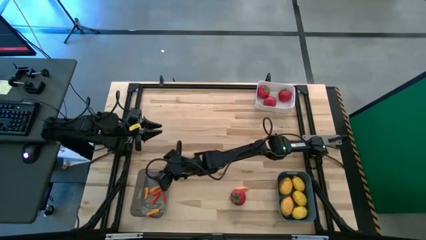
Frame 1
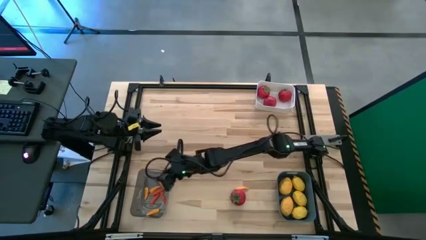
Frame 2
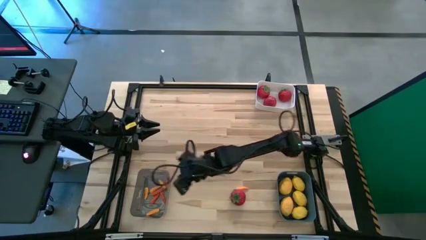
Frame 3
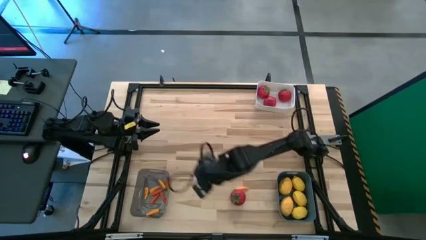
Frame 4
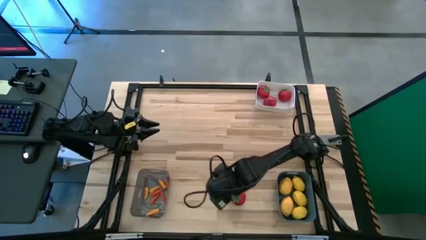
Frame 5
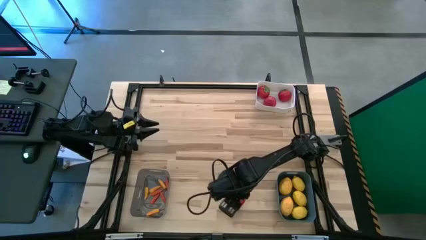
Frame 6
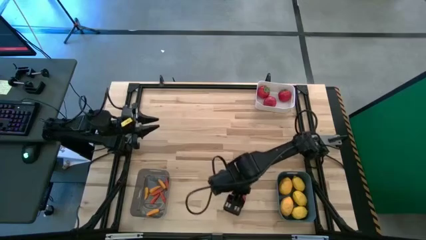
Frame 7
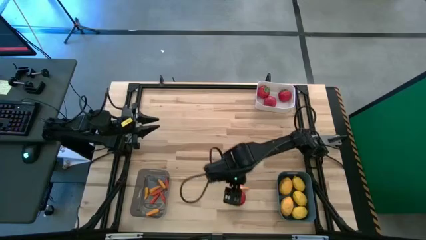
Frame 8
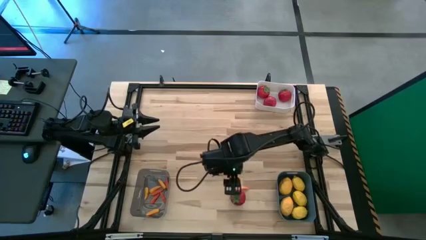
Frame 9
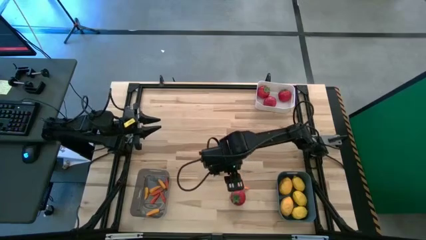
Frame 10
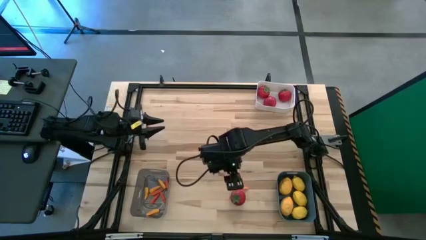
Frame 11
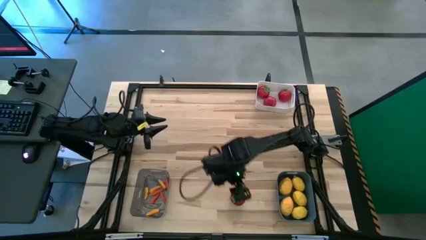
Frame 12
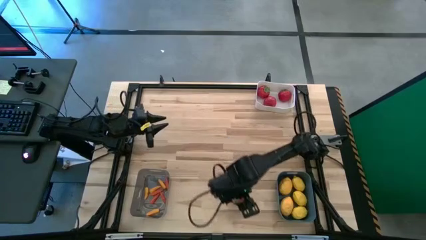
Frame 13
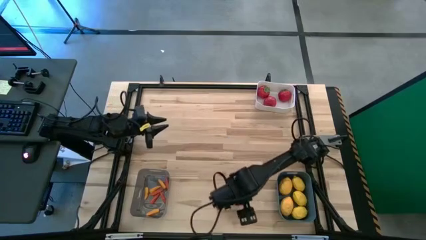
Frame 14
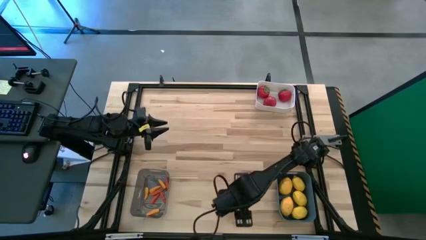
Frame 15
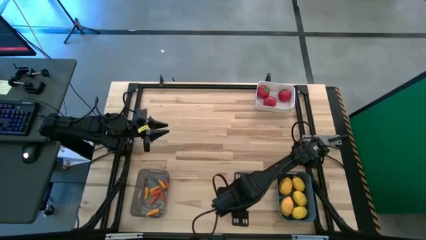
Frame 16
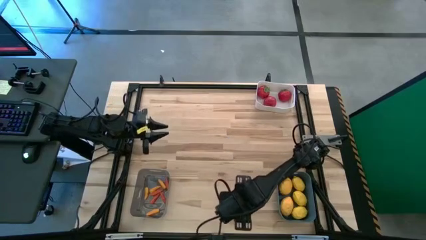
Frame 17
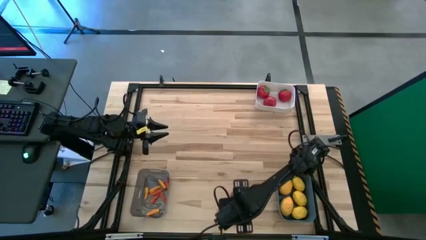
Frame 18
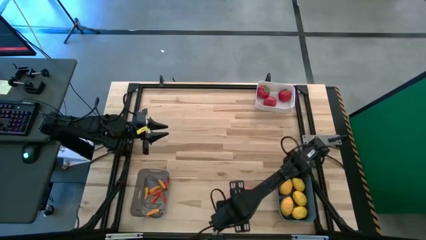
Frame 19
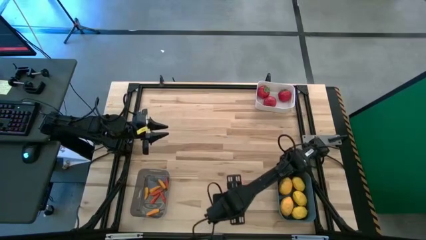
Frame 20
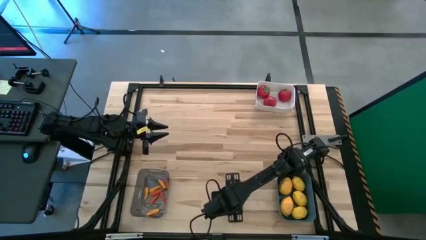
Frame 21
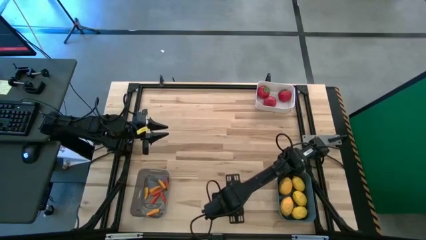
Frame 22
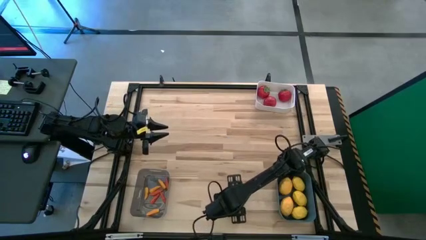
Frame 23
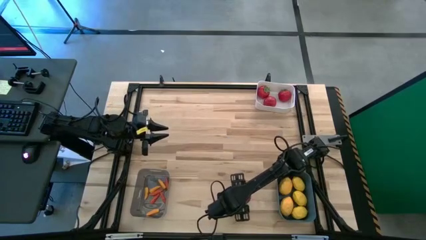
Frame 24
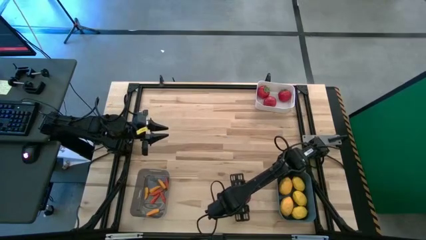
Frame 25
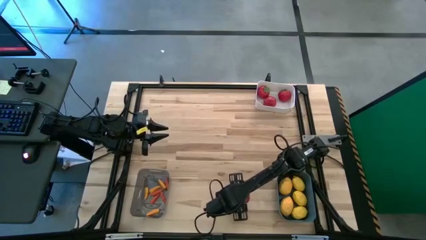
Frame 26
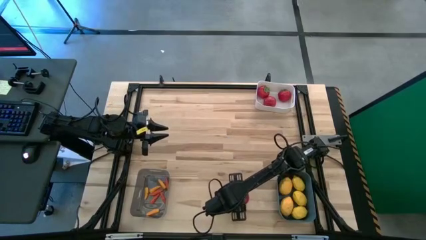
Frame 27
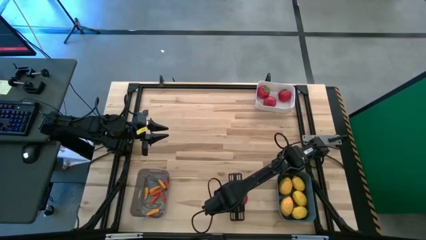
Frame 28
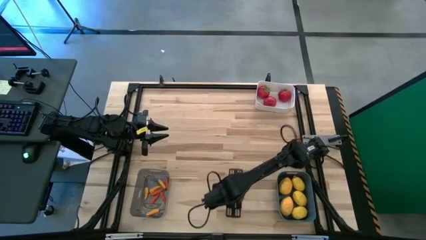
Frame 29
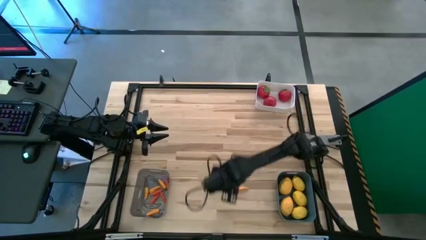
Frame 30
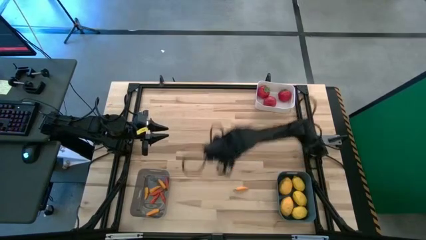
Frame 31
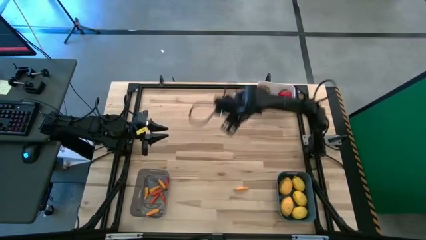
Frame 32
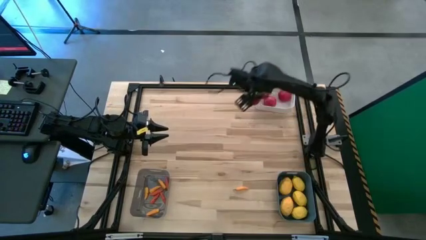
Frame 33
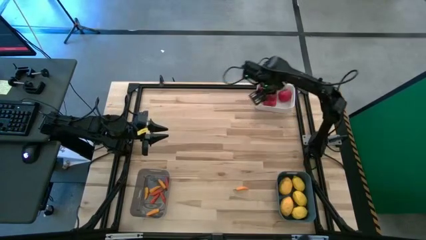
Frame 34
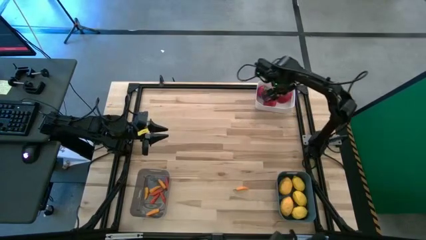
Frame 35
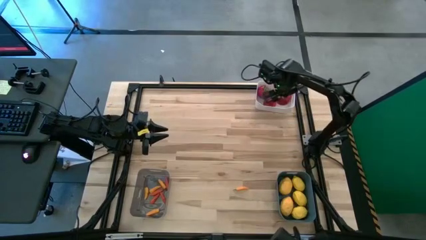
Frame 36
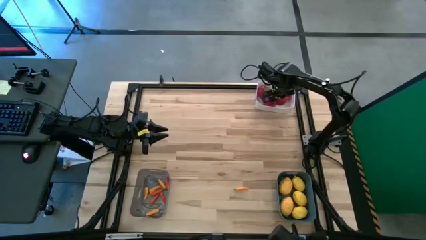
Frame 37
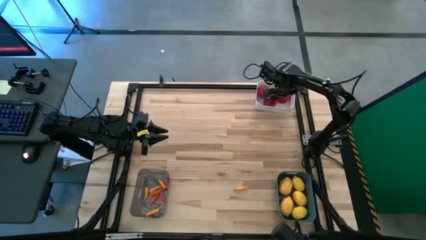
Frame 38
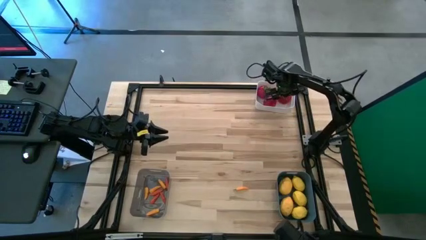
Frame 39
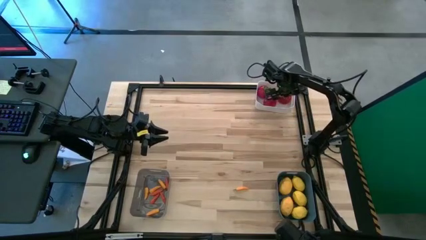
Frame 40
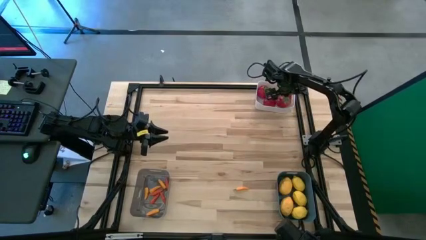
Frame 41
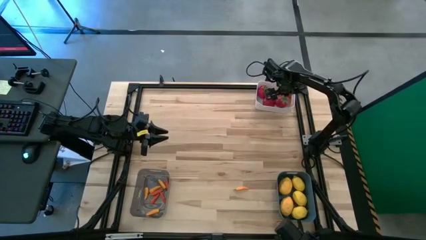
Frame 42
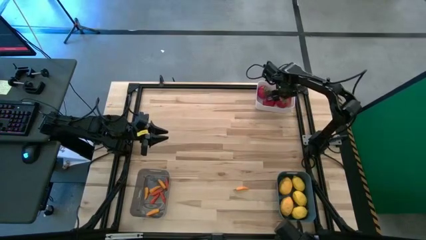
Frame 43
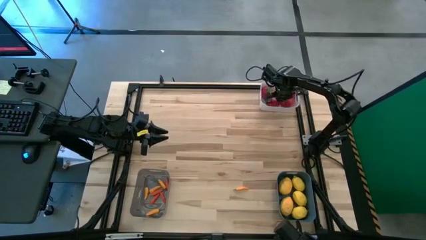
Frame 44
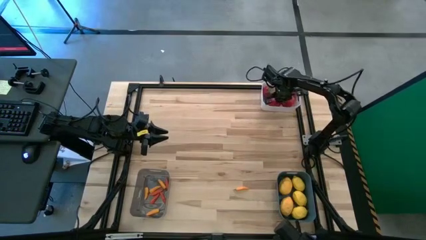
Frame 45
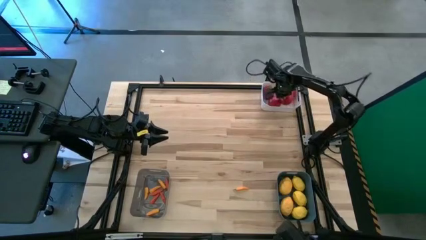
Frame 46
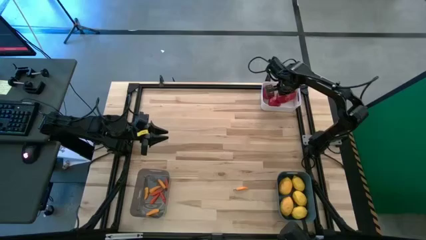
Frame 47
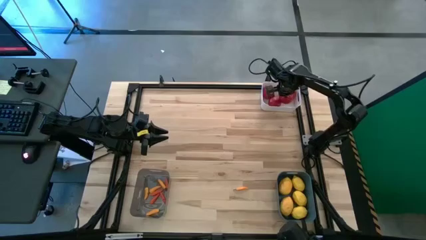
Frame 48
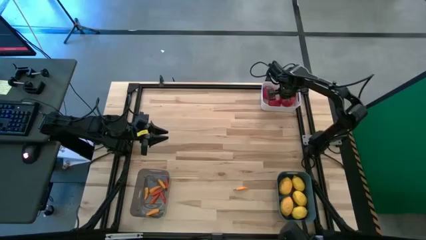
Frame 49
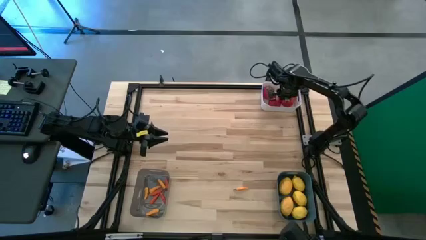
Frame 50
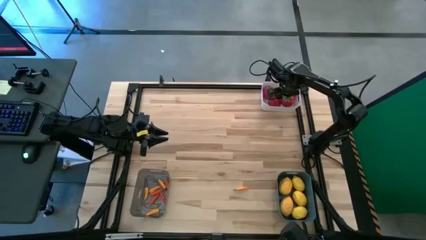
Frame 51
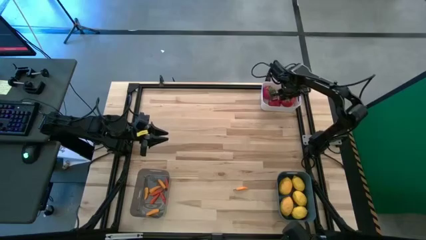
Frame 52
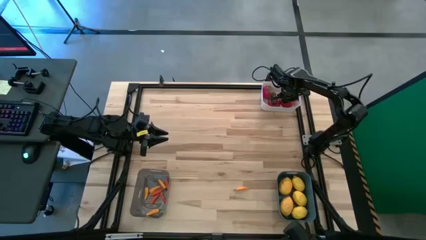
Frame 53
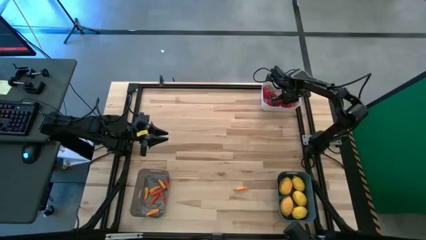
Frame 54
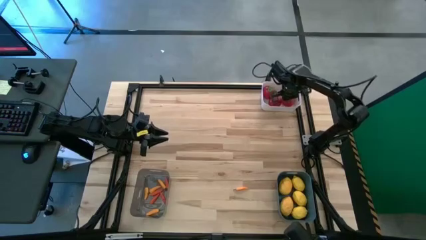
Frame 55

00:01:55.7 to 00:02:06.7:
Task: Sort produce into baskets
Put the tomato into the white bin

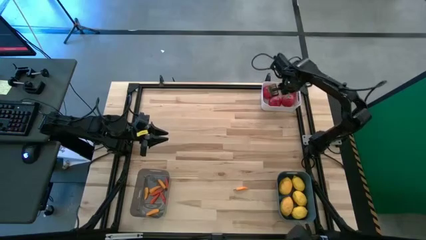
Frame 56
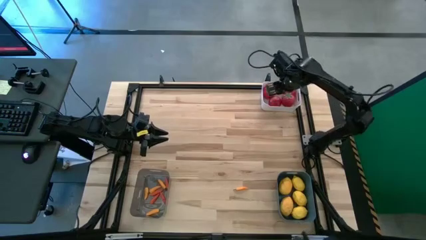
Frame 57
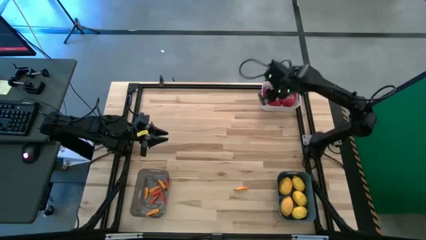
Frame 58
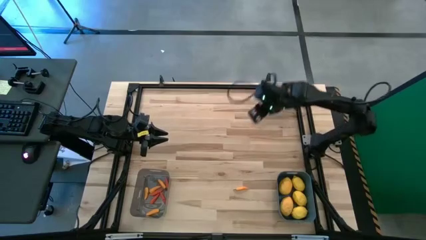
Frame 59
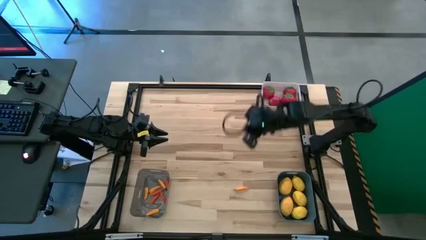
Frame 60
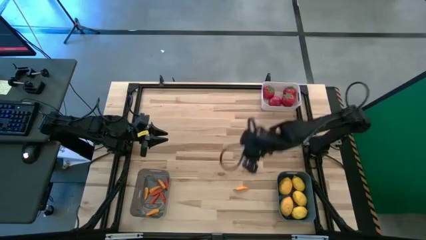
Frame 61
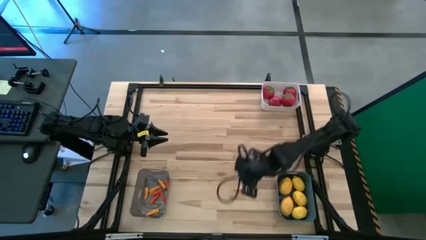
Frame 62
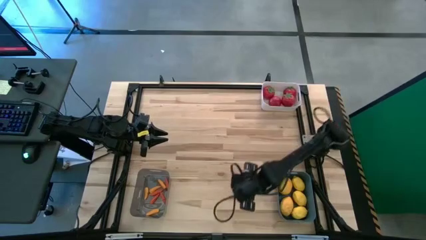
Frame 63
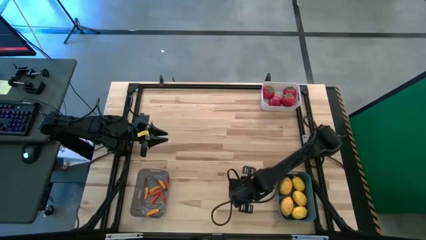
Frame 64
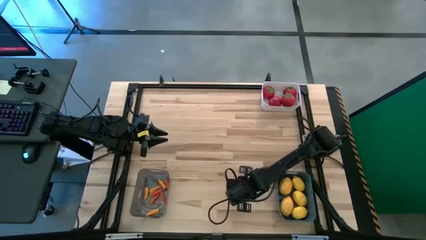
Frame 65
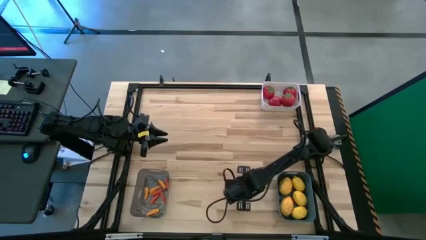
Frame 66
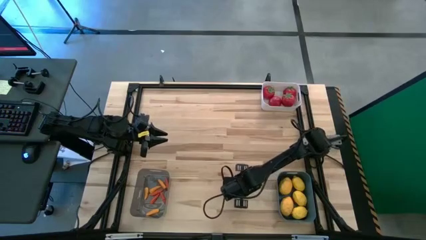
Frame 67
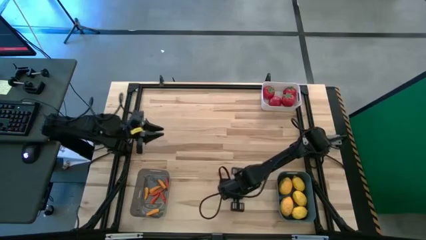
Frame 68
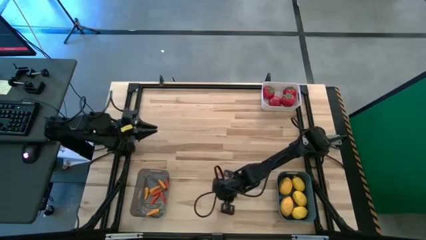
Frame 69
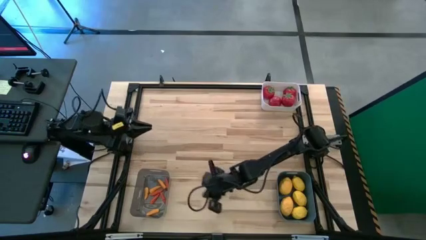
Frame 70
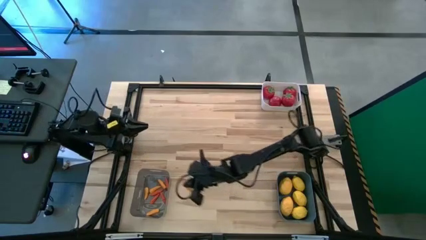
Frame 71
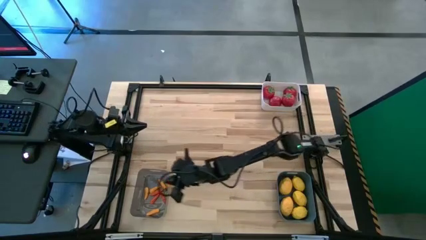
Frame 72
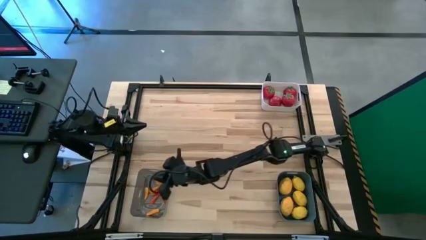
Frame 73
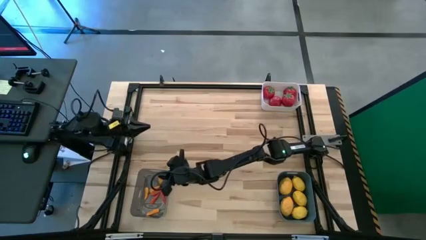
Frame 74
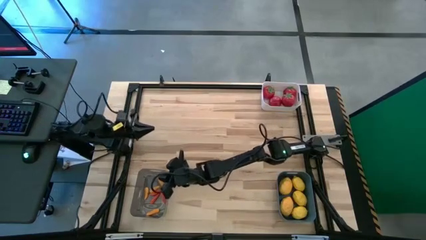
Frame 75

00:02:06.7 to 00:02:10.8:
Put the yellow chili pepper into the black bin
